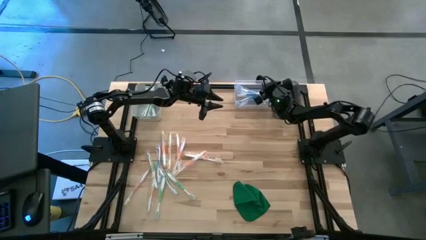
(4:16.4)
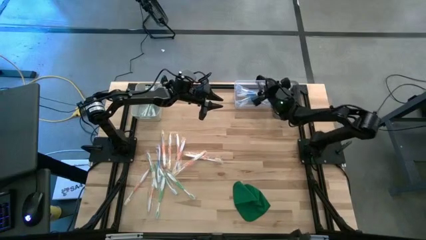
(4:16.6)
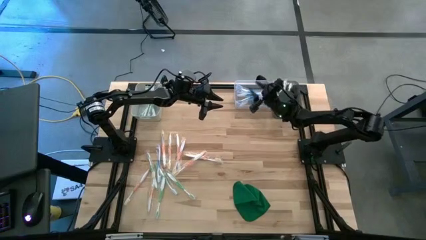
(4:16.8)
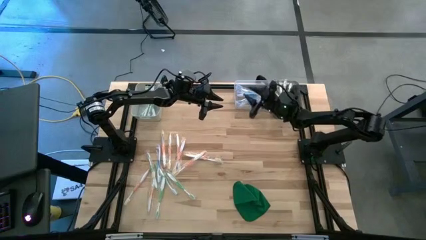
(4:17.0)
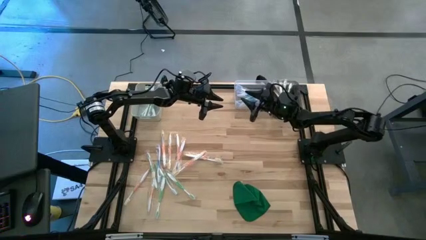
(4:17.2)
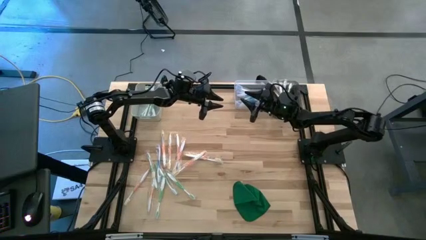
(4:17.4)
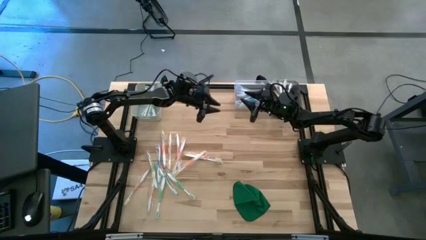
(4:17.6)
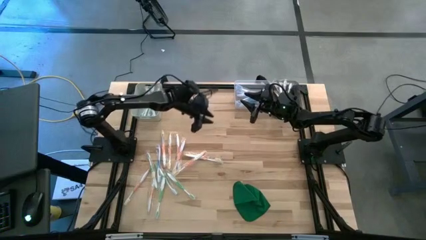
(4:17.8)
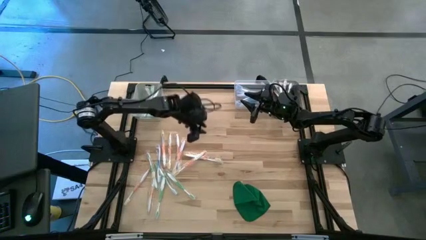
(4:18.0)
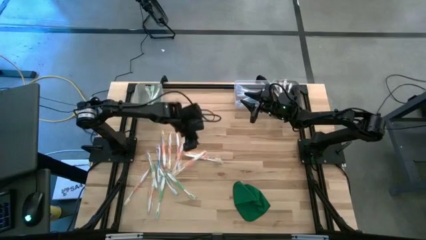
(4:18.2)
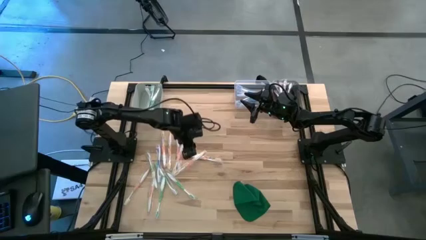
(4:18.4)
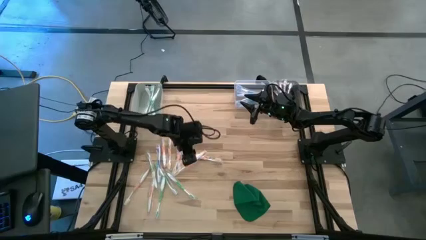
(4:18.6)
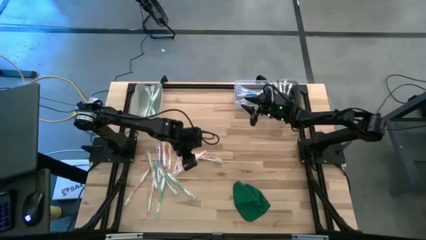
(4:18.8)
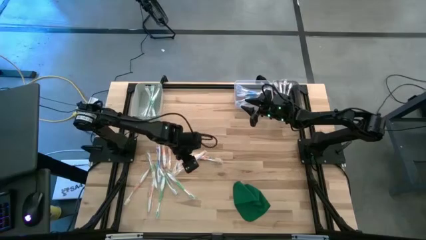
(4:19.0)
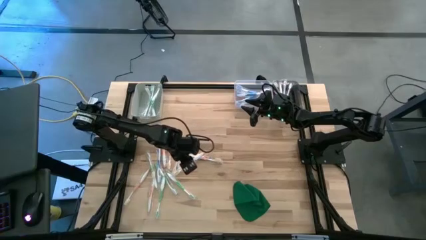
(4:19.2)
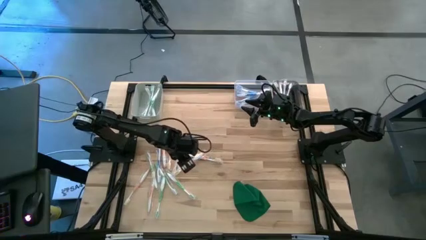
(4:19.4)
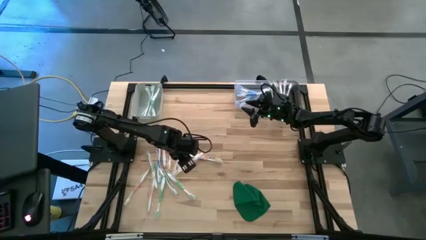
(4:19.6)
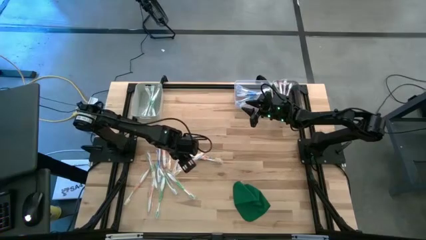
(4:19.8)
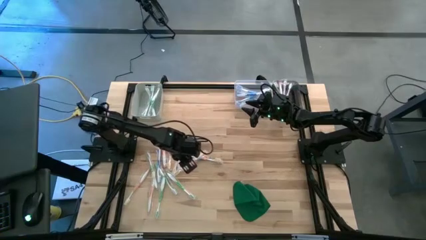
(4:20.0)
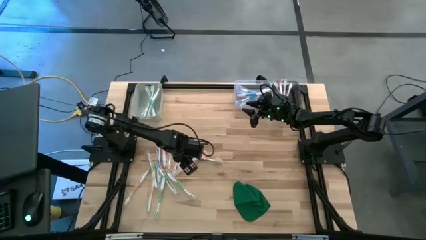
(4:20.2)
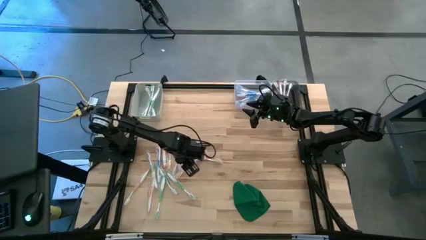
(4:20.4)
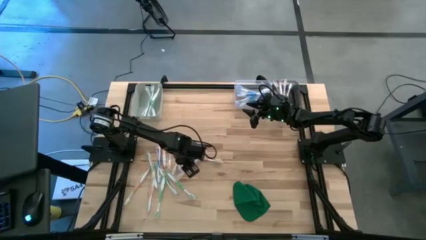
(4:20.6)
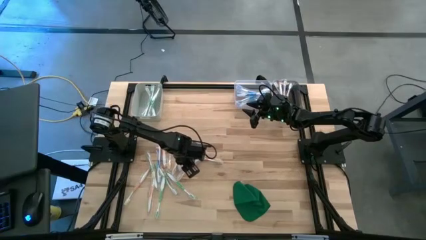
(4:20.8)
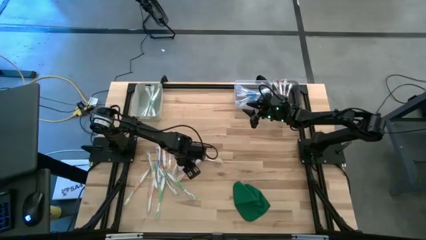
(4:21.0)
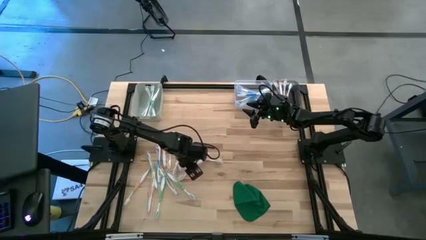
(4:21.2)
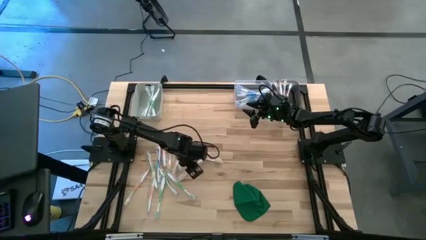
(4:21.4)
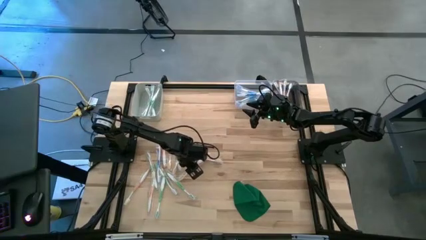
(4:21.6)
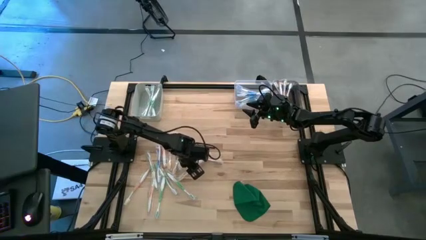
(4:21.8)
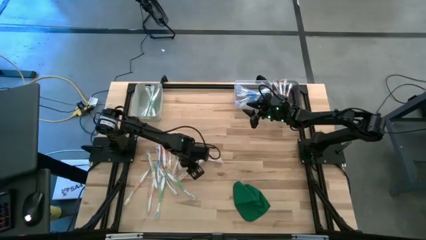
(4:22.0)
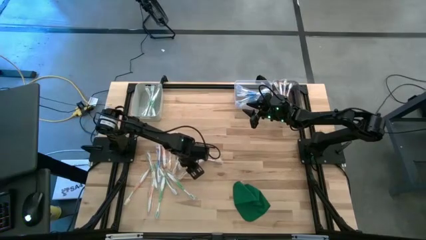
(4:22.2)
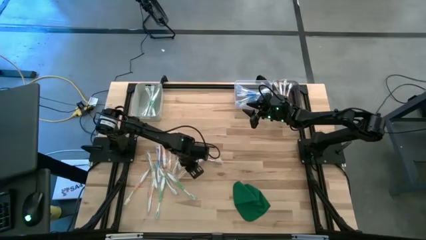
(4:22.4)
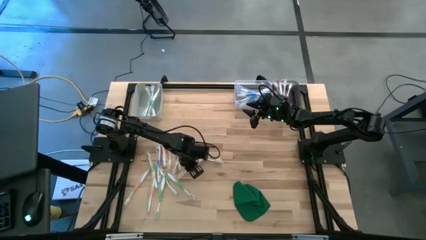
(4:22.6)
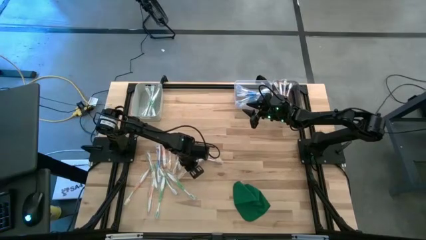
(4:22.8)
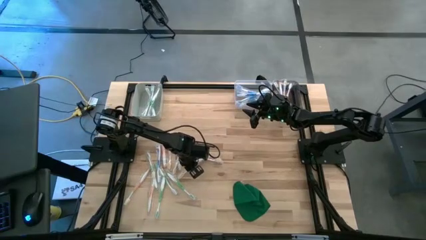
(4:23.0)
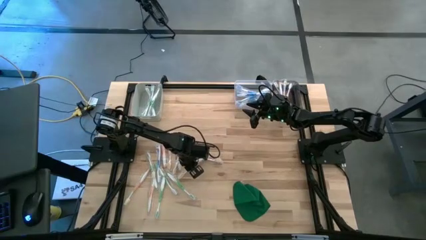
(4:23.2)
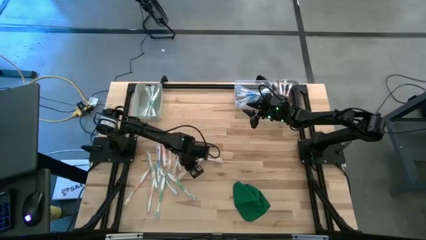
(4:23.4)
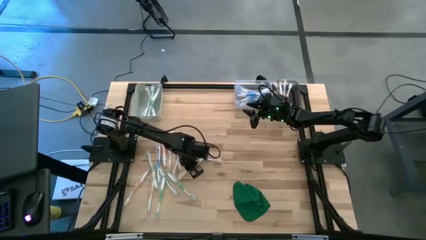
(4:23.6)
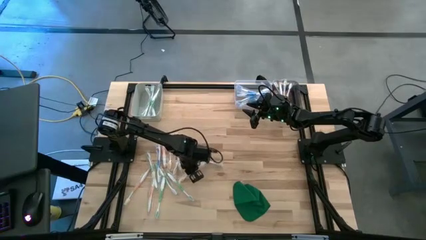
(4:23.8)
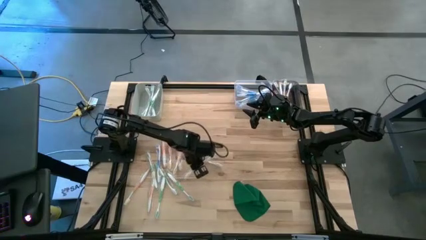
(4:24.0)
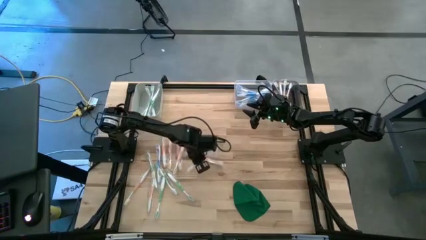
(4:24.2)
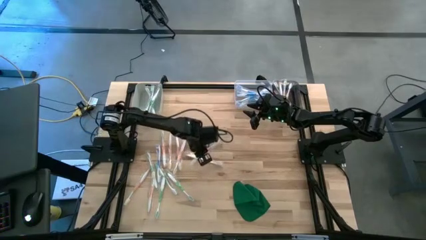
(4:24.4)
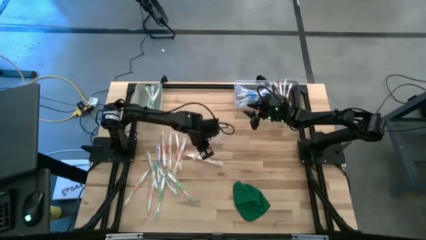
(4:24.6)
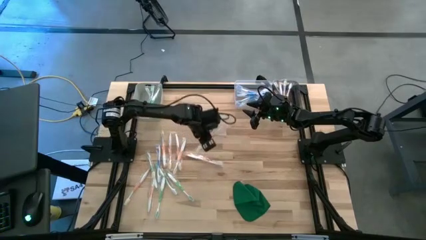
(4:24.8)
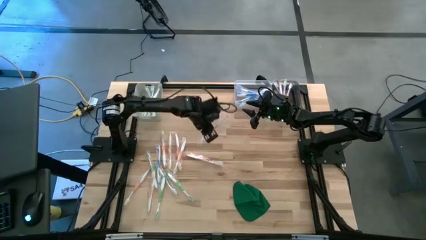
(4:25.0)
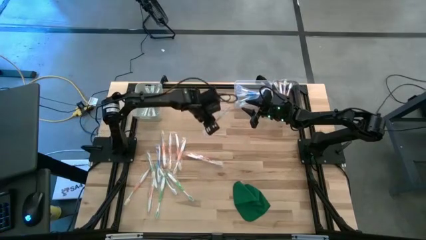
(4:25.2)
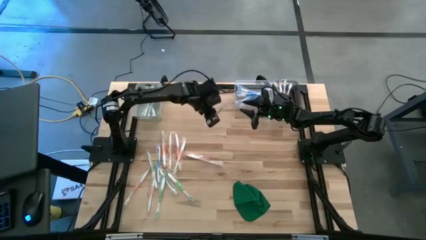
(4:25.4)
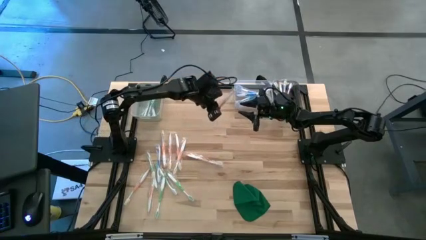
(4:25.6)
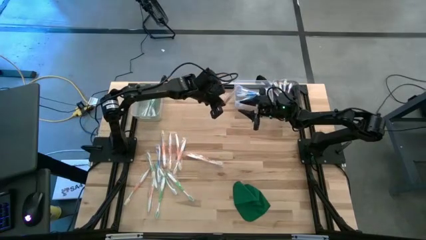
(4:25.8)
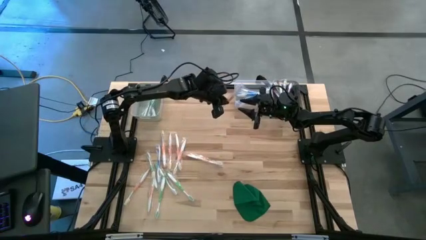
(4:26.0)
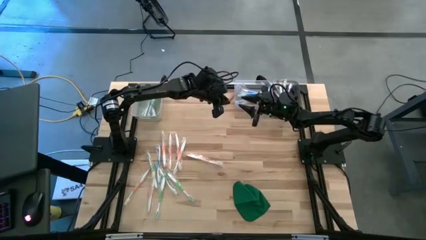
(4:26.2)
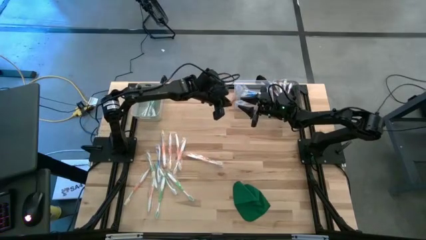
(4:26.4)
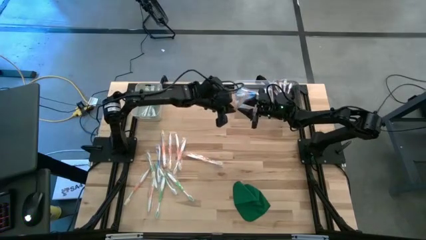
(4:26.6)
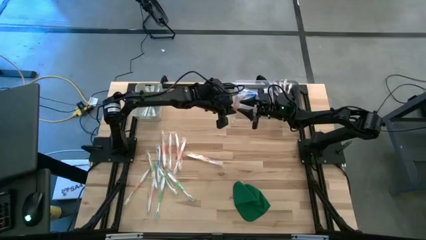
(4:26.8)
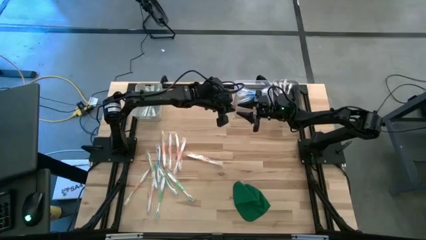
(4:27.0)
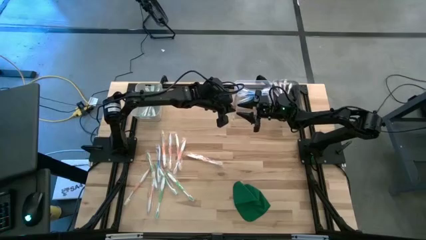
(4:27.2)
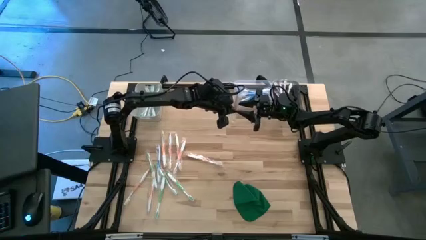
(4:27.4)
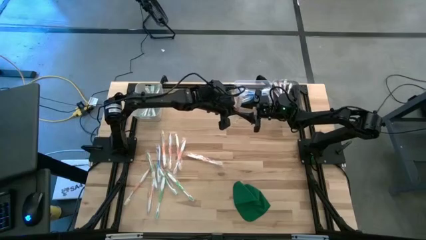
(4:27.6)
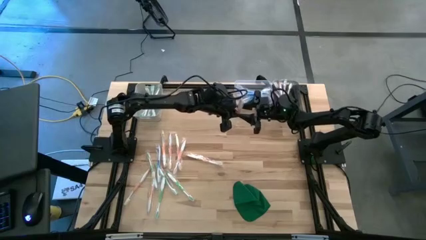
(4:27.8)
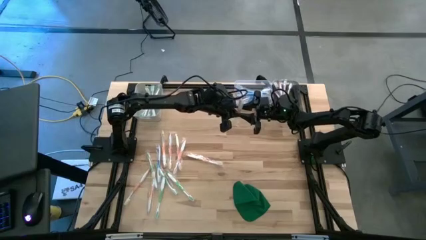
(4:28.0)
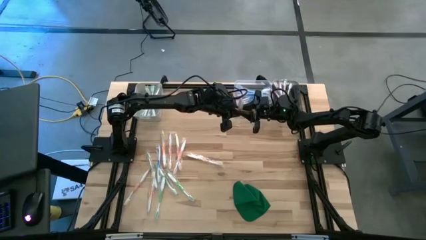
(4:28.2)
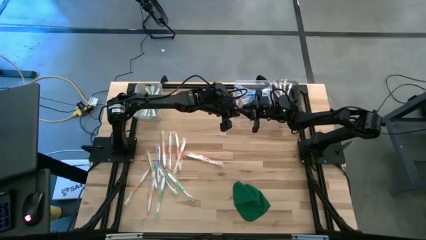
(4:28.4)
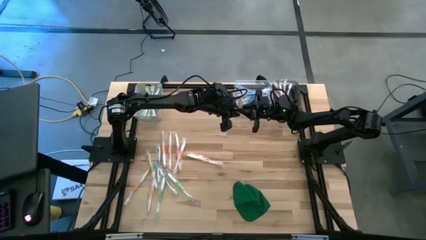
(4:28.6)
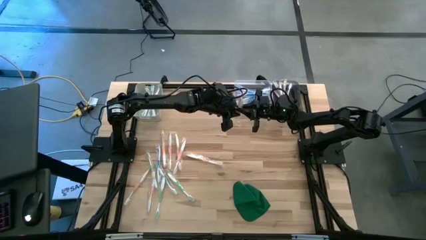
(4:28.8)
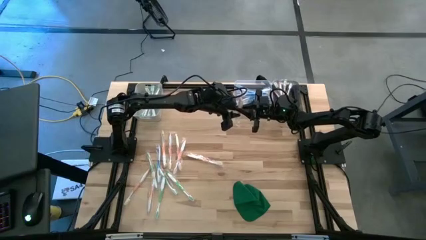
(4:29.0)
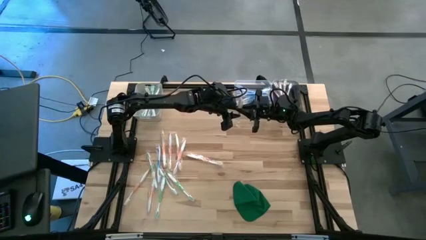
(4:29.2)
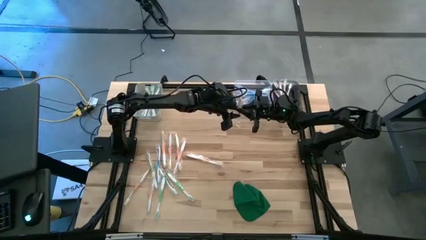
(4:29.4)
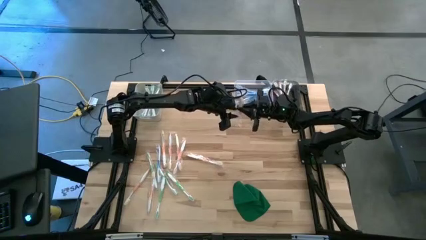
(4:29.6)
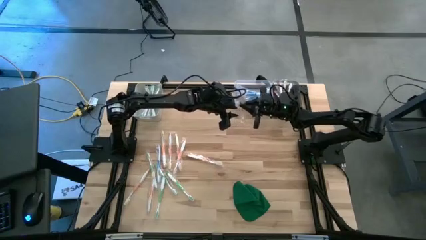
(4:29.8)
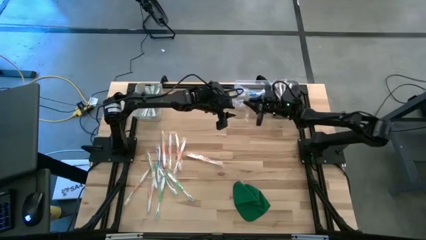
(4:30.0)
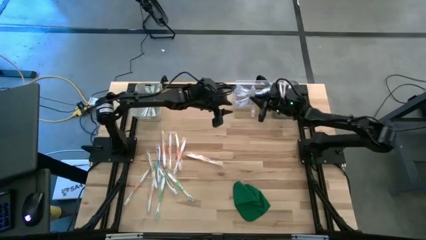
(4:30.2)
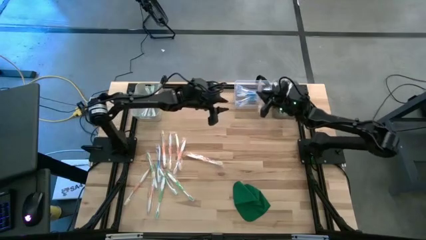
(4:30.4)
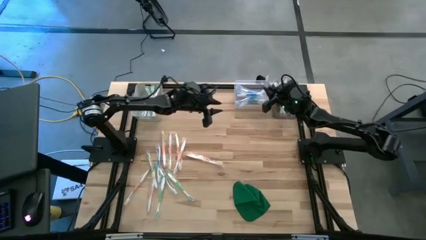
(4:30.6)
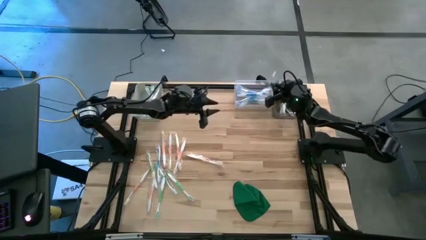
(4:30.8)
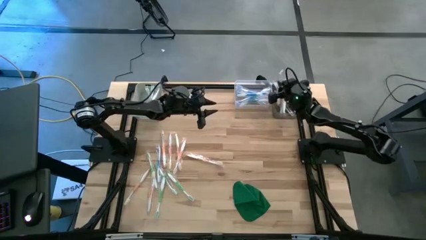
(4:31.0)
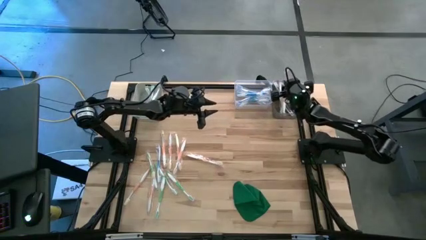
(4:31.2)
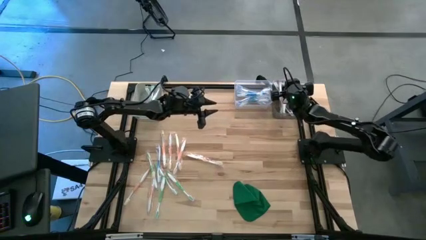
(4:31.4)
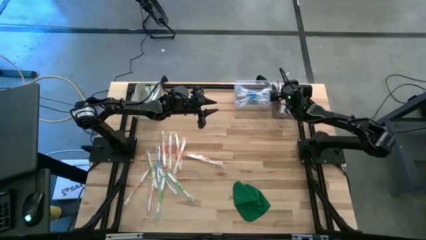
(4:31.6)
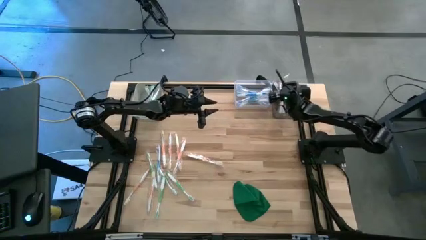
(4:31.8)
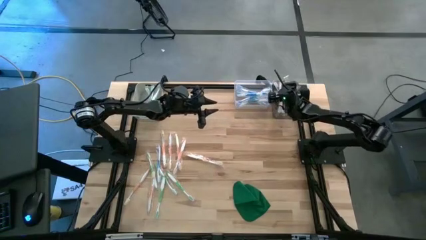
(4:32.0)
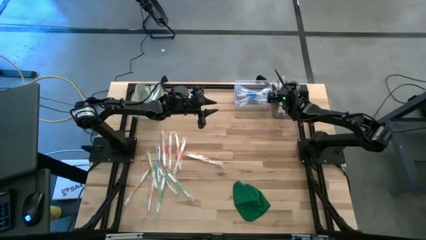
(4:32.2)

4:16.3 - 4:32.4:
Task: Pick & Place Toothbrushes
Put the orange toothbrush into the black bin
